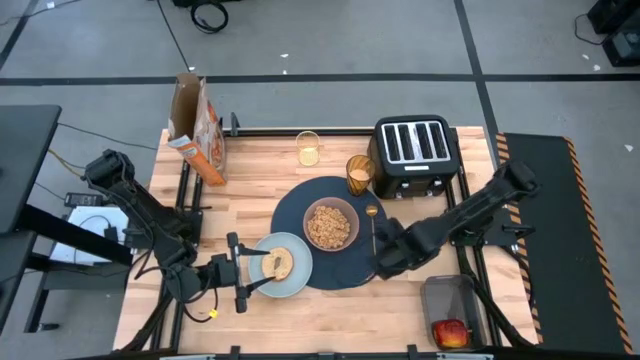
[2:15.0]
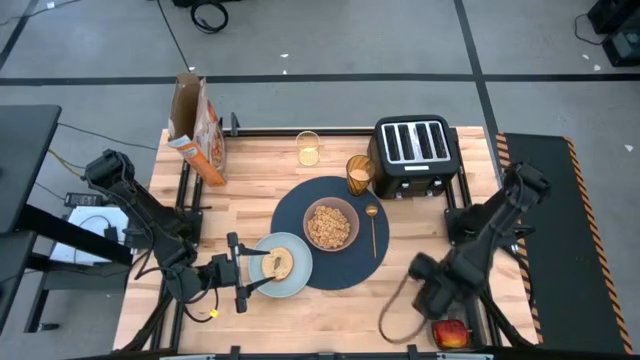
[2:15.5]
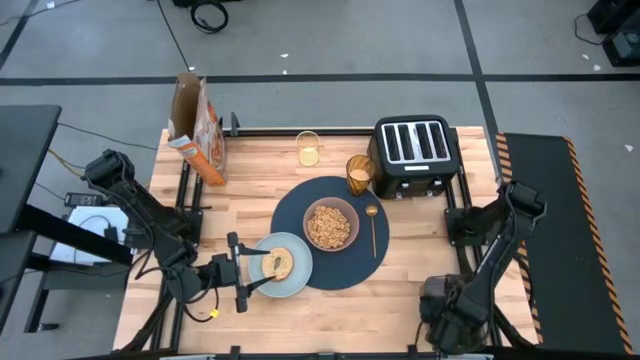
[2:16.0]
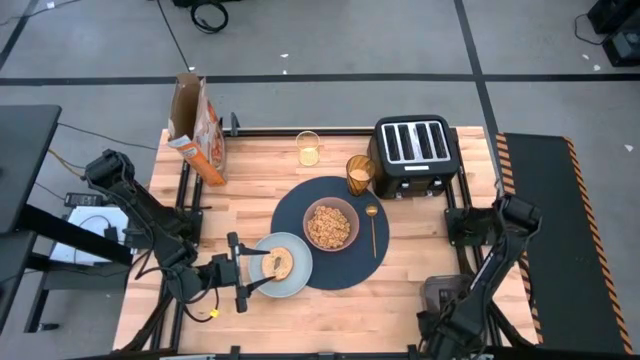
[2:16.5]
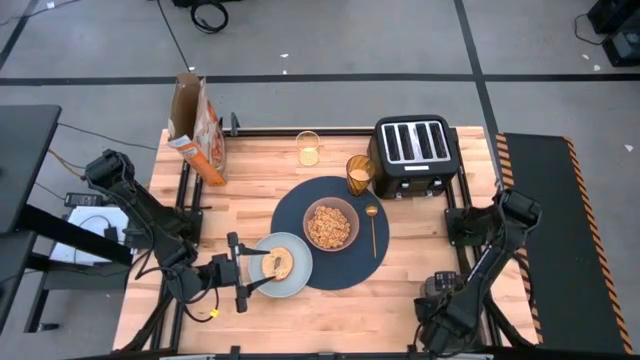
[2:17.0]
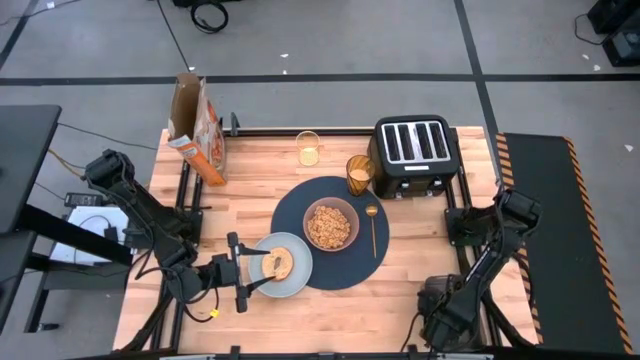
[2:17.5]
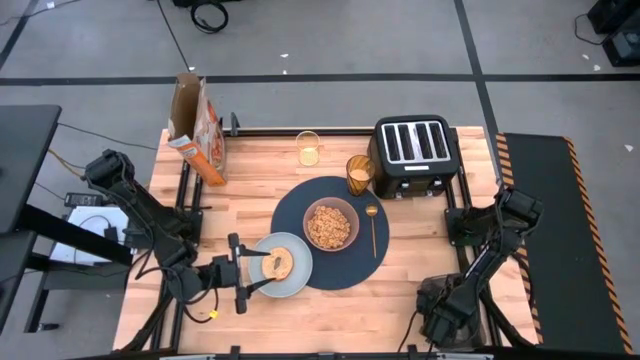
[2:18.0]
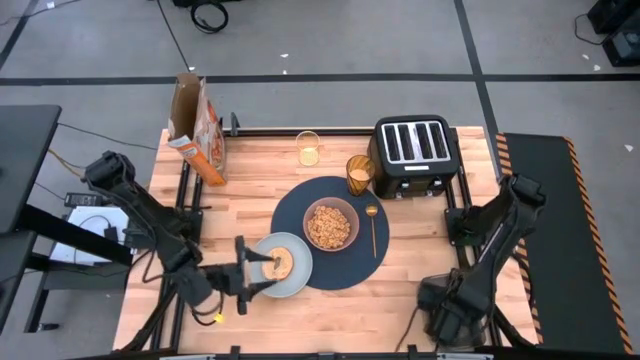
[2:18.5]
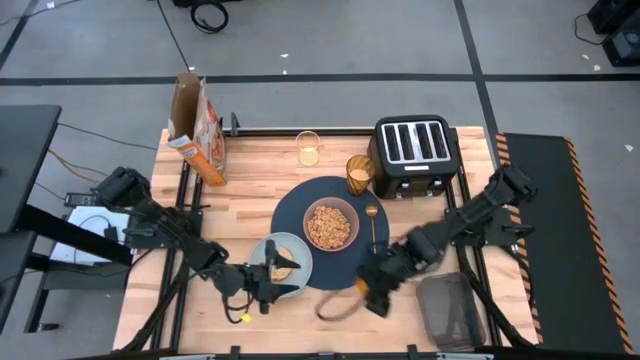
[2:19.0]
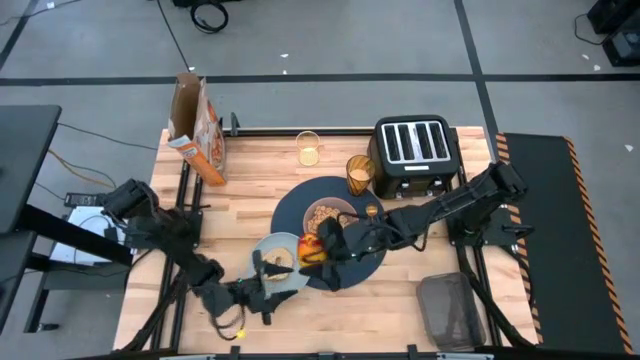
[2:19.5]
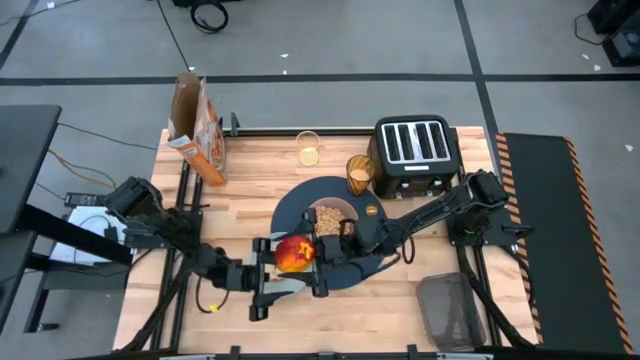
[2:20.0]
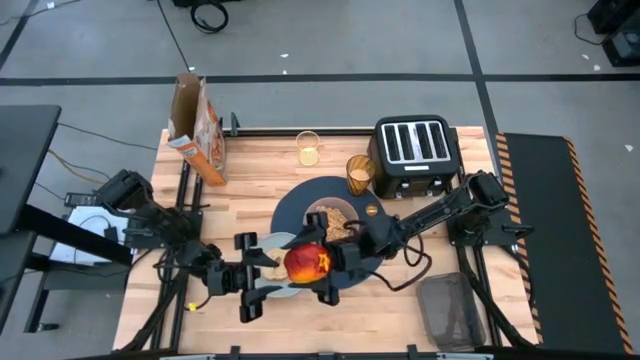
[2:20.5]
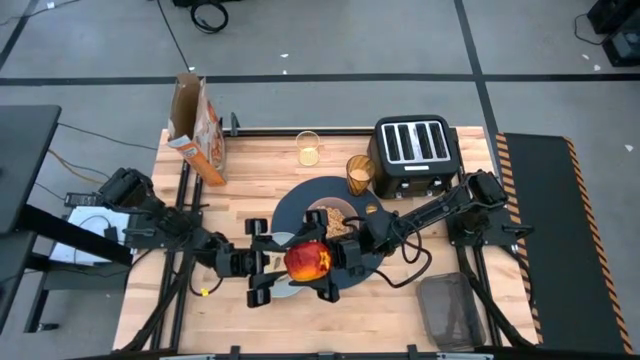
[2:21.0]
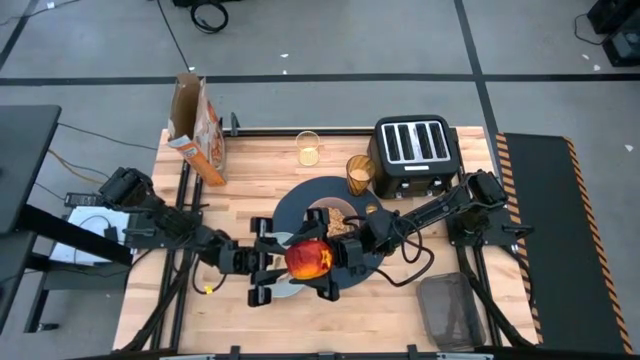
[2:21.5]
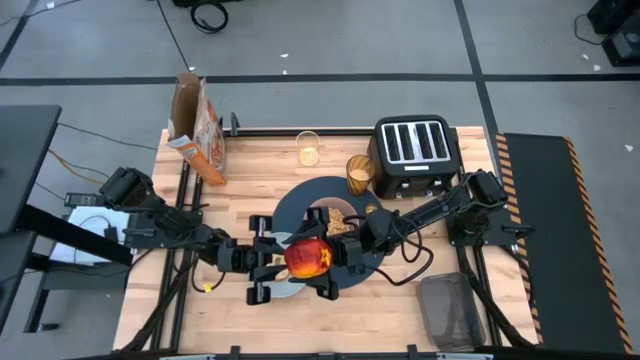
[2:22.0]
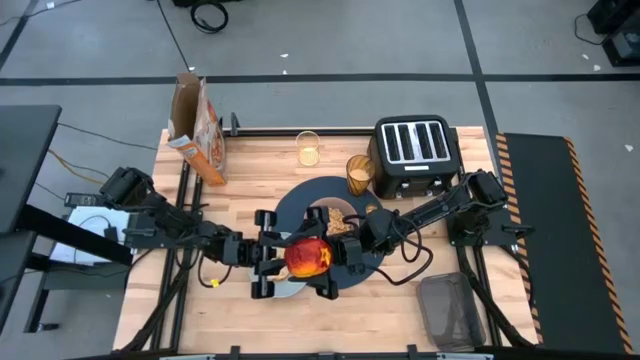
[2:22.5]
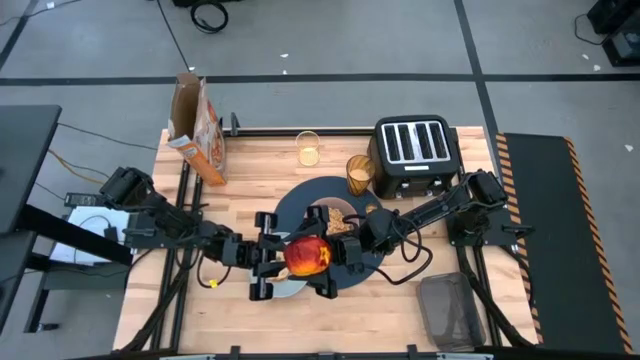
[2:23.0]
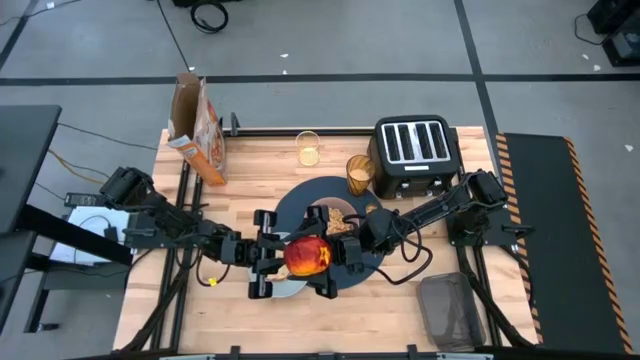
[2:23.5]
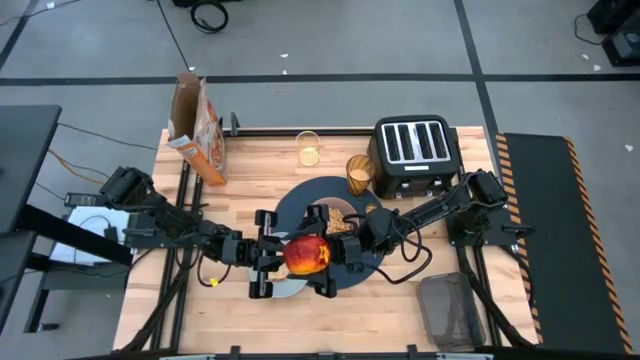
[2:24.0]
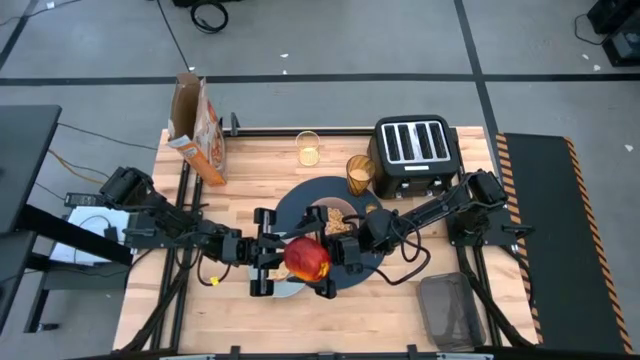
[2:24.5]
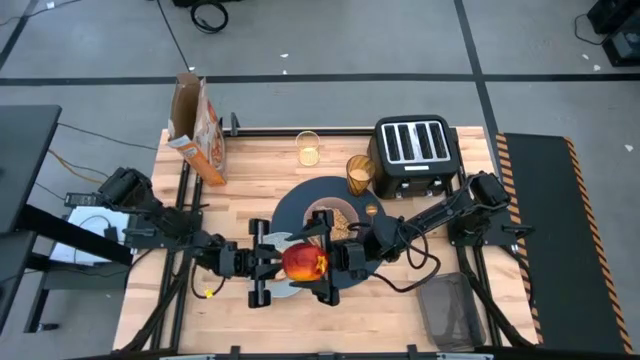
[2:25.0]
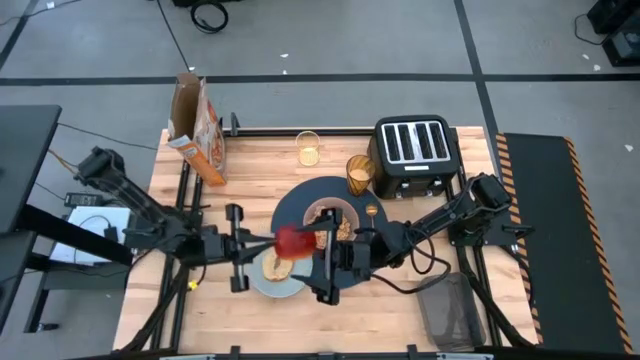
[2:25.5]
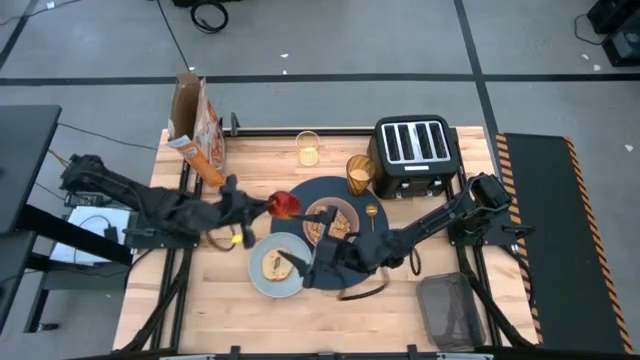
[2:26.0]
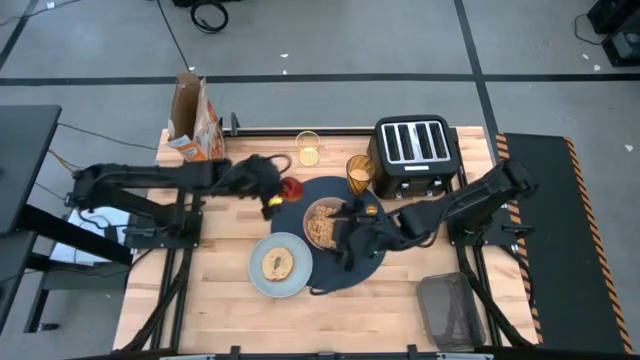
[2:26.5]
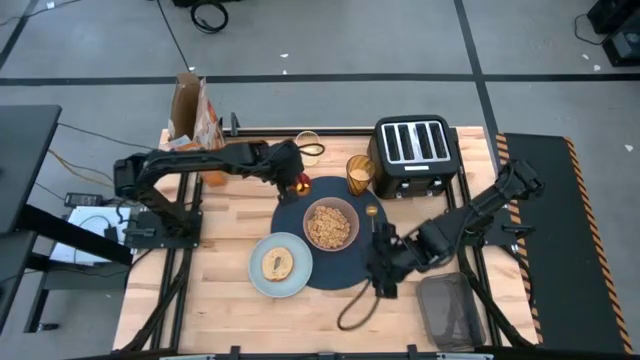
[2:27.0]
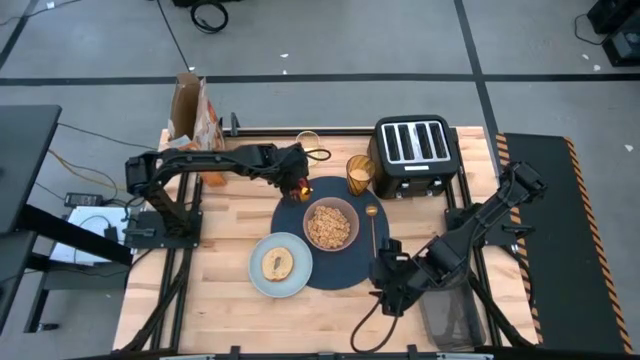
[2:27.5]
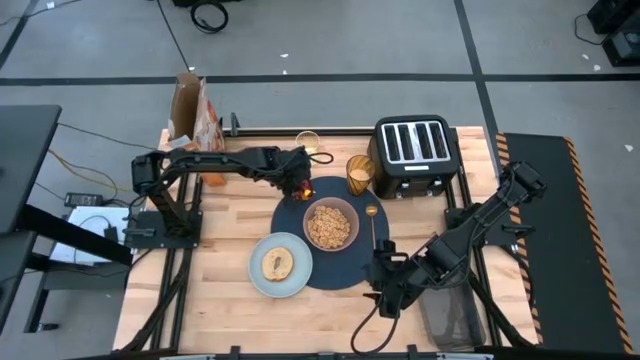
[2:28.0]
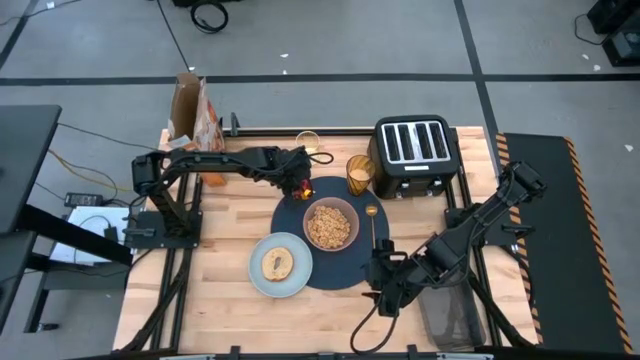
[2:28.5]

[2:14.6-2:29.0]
Task: Arrange a breakfast setting
Put the red apple on the top left of the blue tablemat

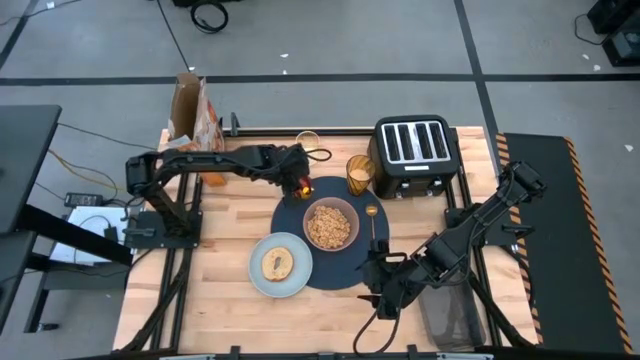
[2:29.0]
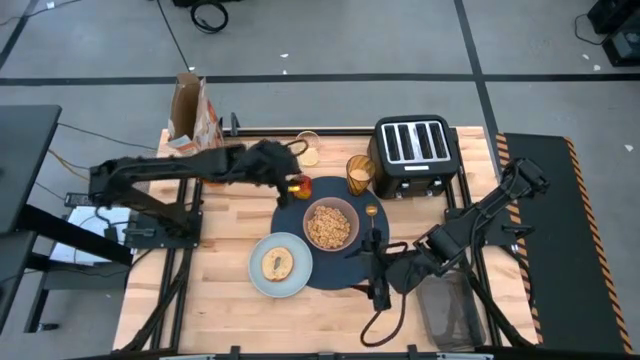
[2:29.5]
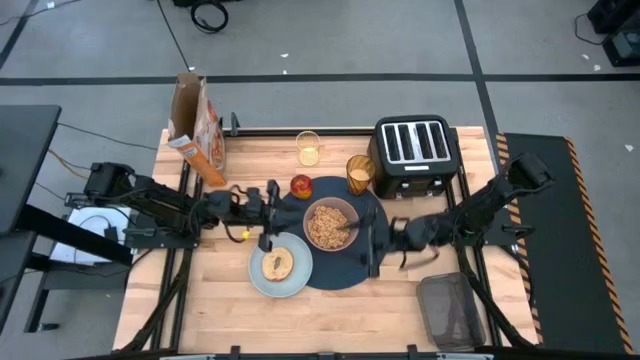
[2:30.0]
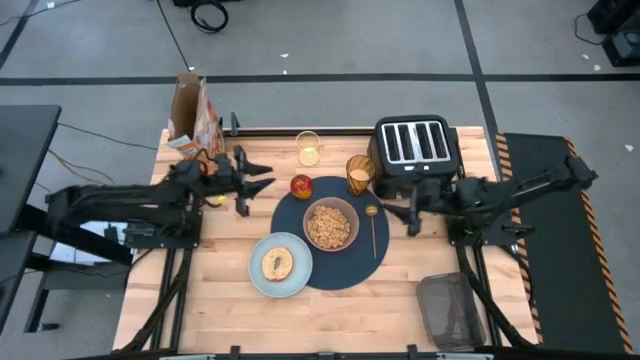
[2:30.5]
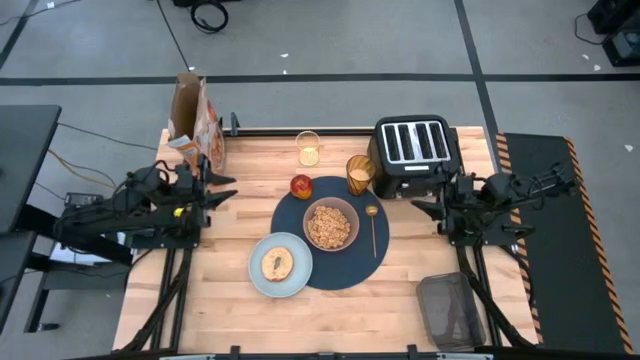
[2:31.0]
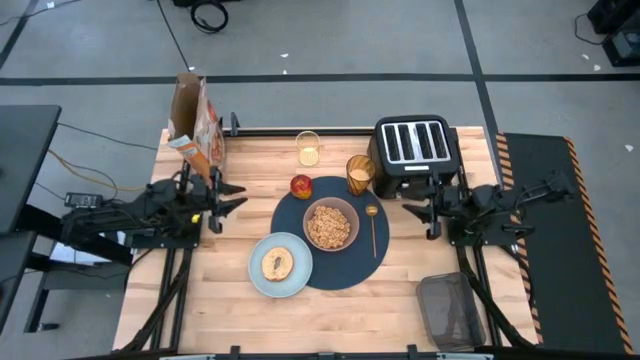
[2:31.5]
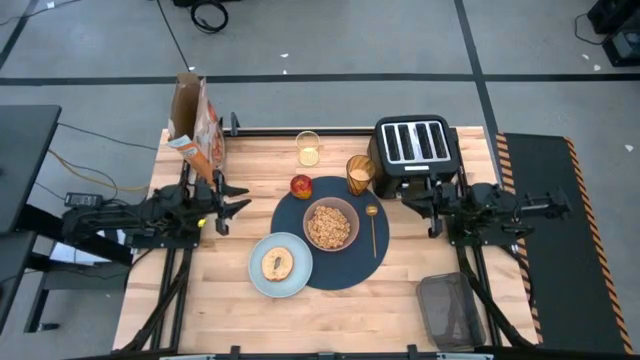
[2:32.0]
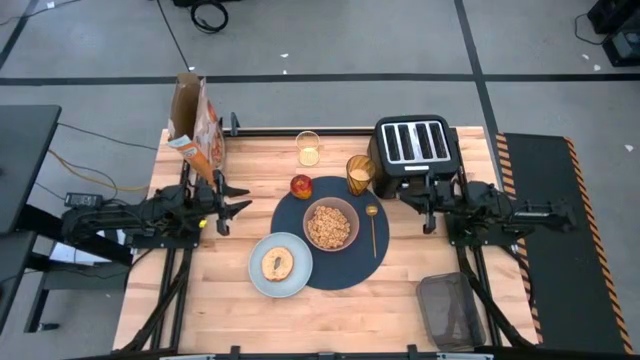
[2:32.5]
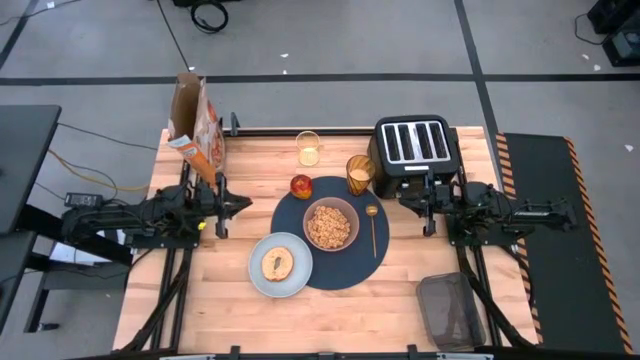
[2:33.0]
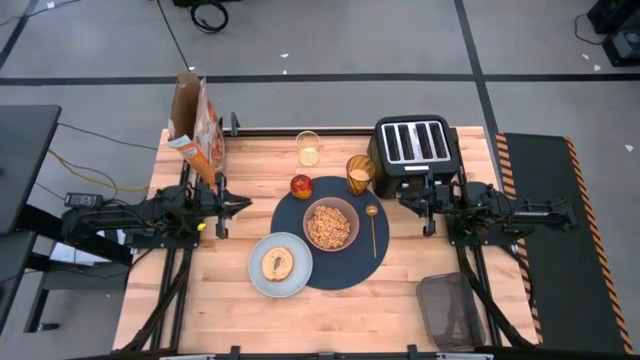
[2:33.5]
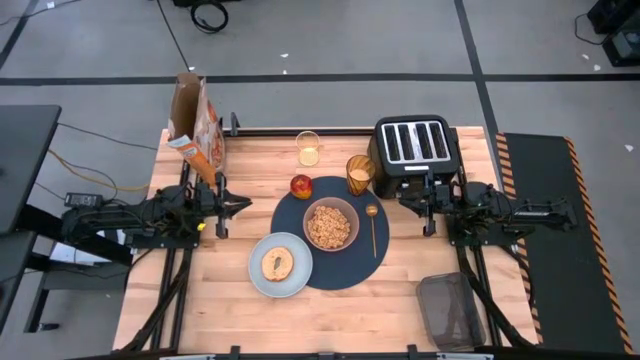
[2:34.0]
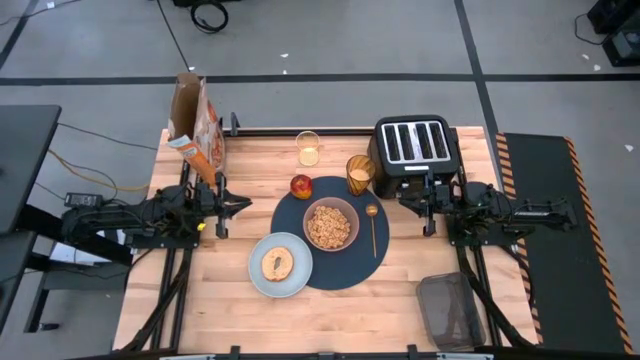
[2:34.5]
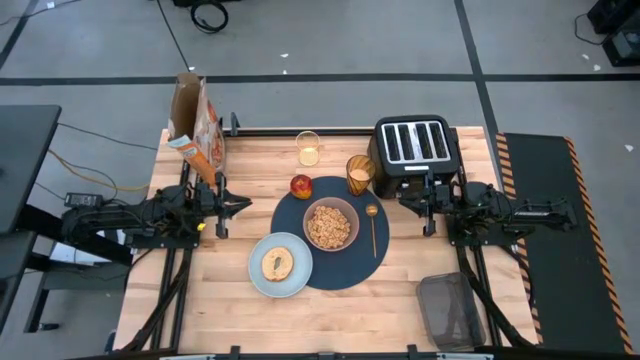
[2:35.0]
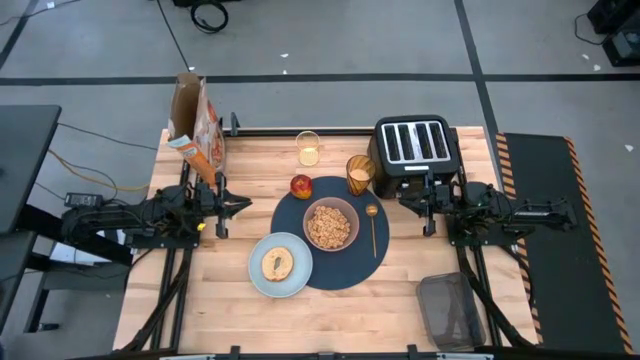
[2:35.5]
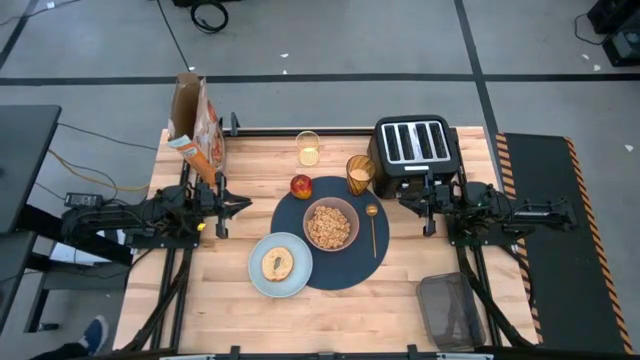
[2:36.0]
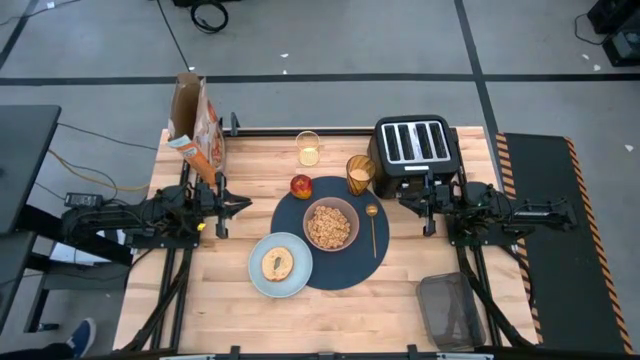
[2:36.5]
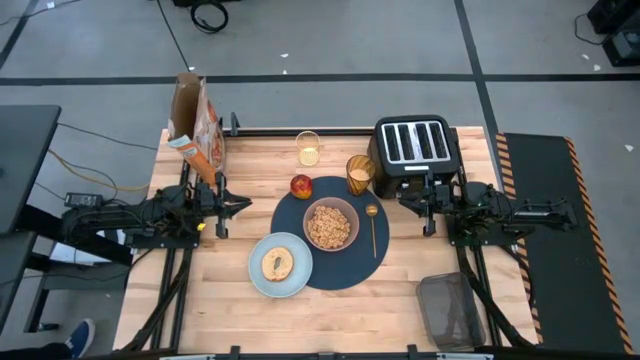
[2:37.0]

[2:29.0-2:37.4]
Return to Home Position
